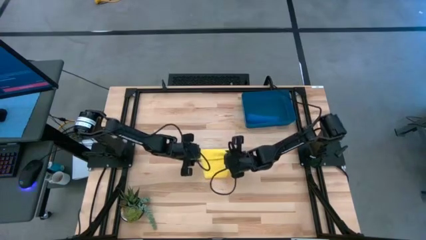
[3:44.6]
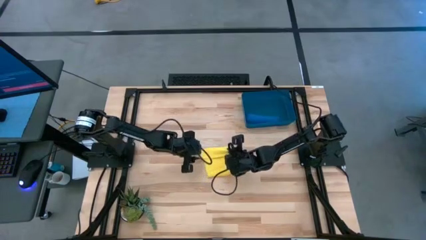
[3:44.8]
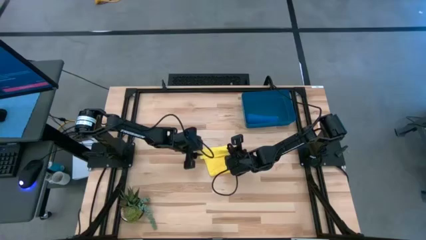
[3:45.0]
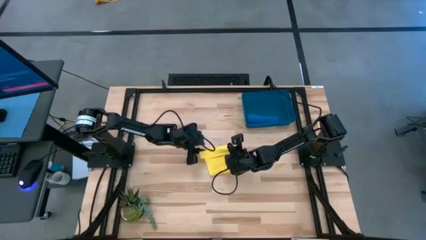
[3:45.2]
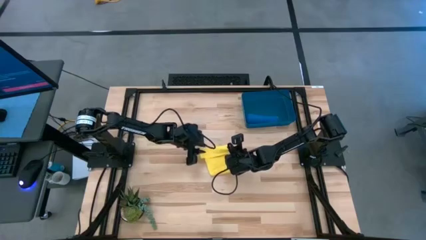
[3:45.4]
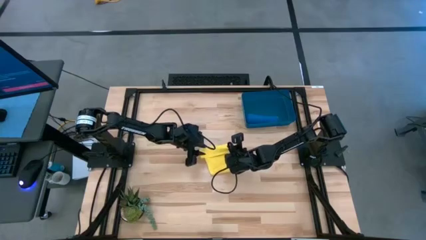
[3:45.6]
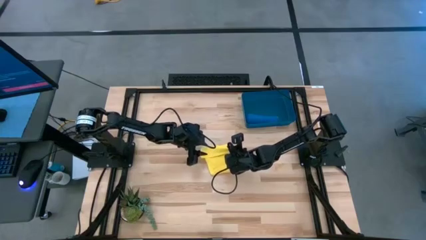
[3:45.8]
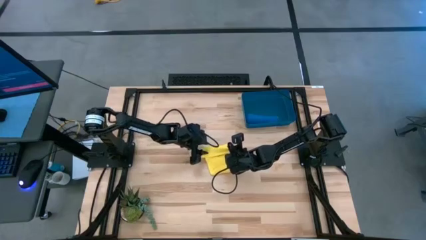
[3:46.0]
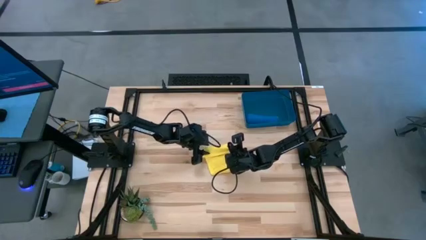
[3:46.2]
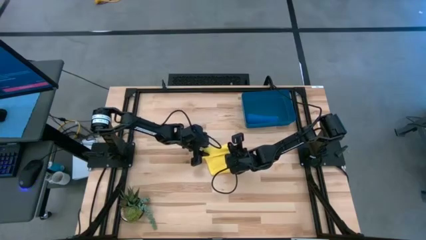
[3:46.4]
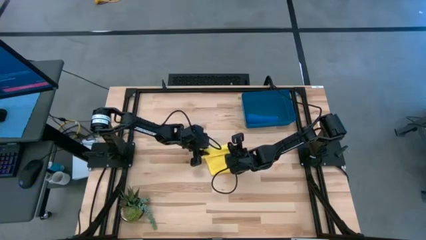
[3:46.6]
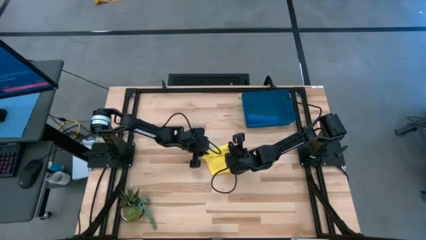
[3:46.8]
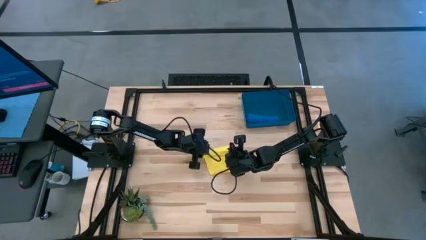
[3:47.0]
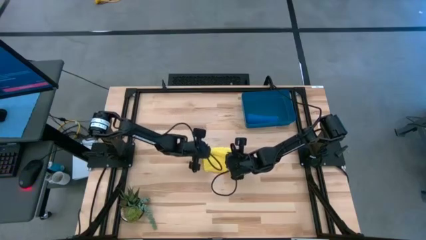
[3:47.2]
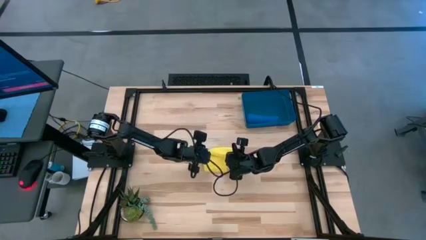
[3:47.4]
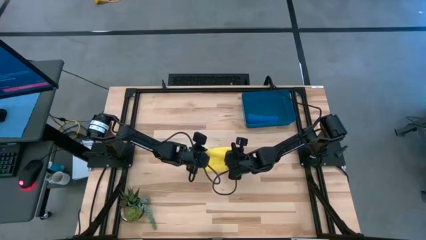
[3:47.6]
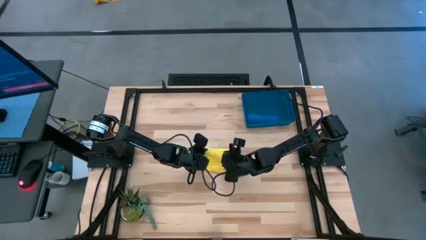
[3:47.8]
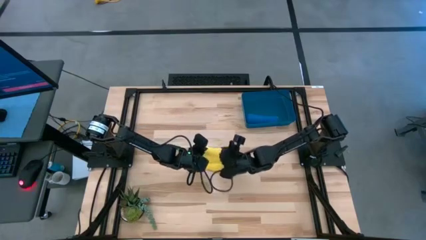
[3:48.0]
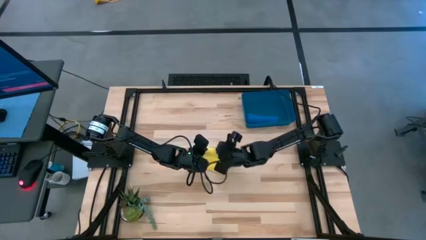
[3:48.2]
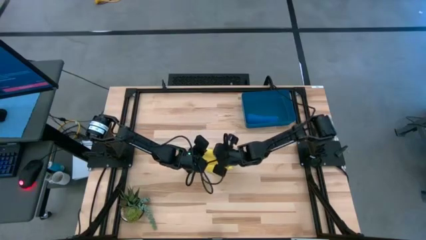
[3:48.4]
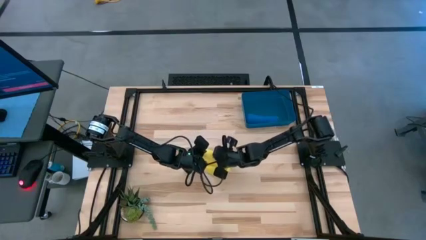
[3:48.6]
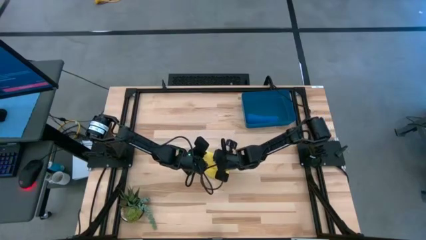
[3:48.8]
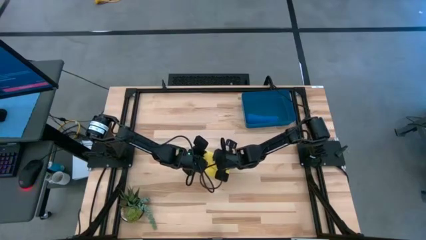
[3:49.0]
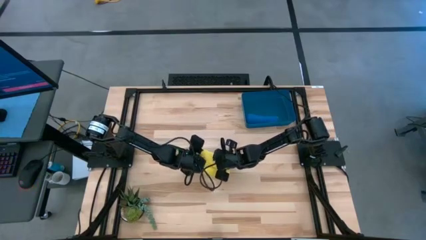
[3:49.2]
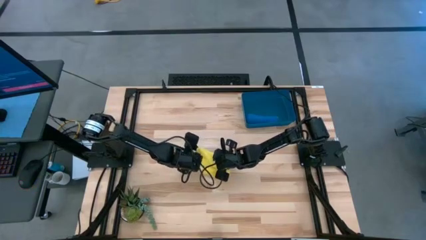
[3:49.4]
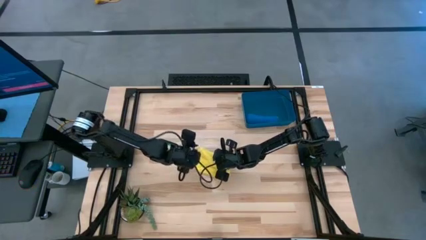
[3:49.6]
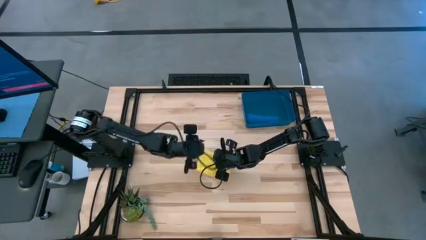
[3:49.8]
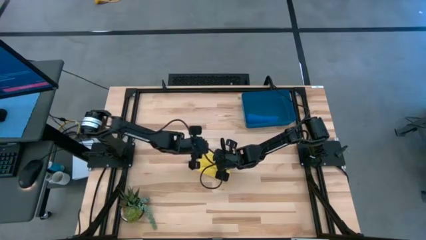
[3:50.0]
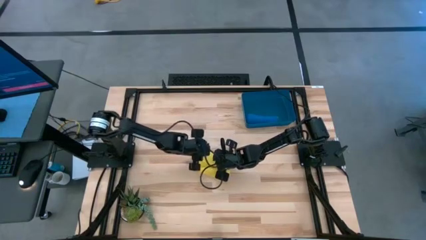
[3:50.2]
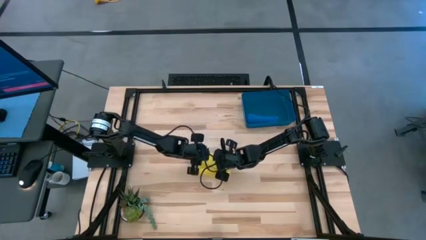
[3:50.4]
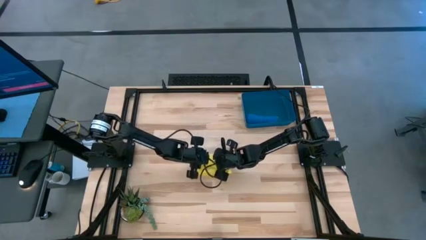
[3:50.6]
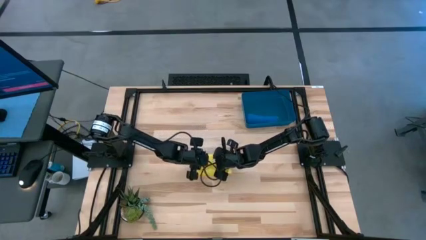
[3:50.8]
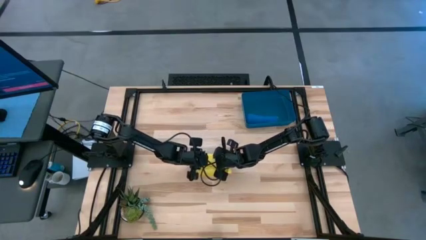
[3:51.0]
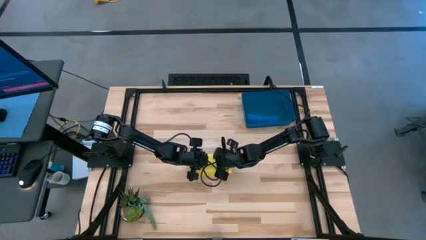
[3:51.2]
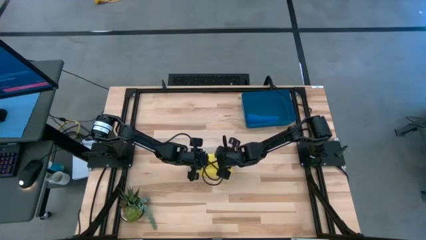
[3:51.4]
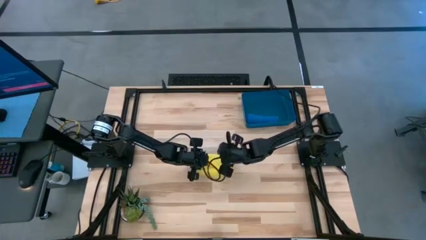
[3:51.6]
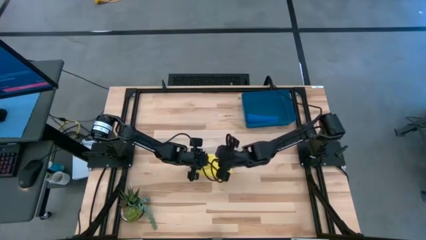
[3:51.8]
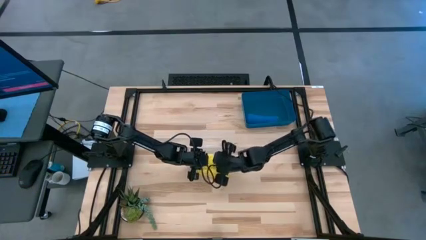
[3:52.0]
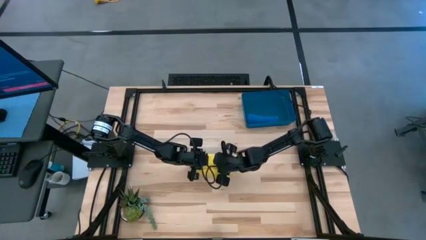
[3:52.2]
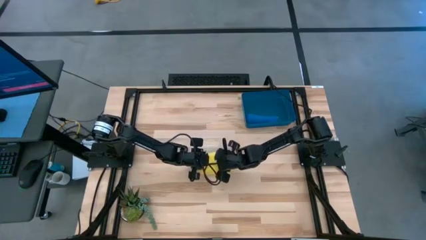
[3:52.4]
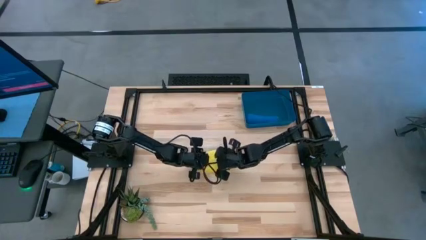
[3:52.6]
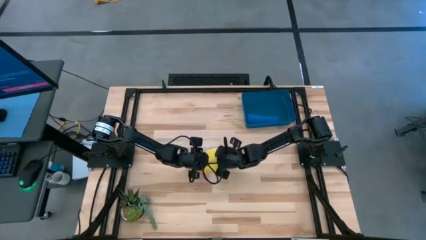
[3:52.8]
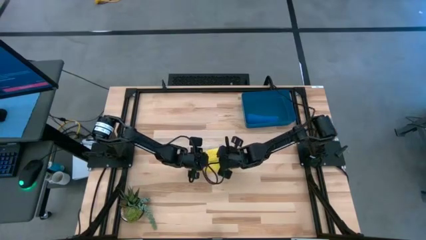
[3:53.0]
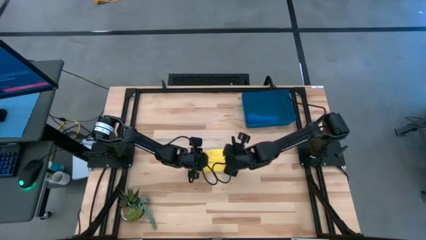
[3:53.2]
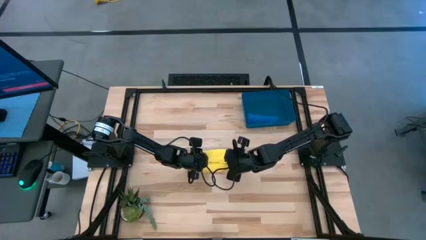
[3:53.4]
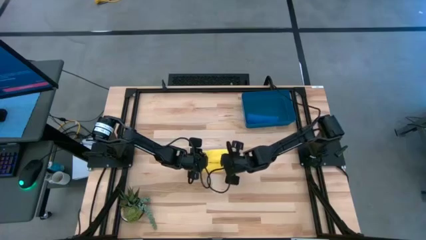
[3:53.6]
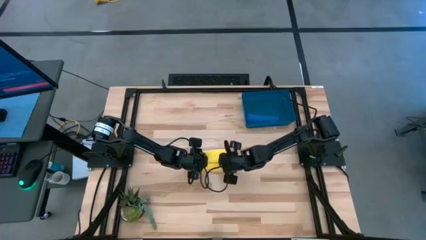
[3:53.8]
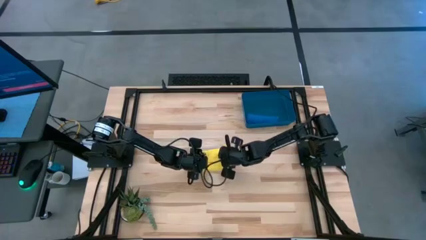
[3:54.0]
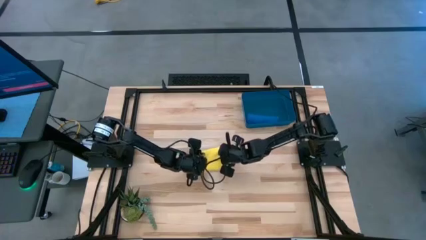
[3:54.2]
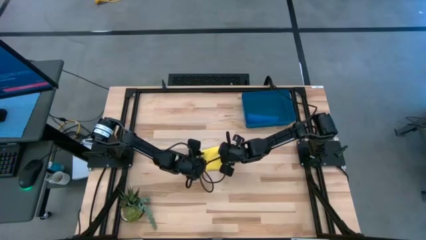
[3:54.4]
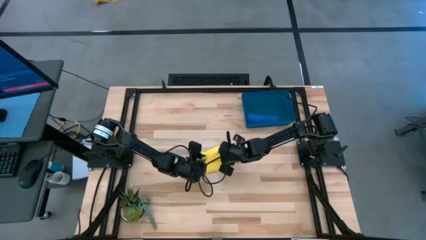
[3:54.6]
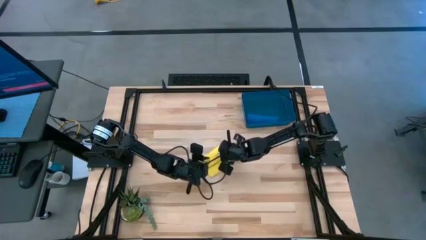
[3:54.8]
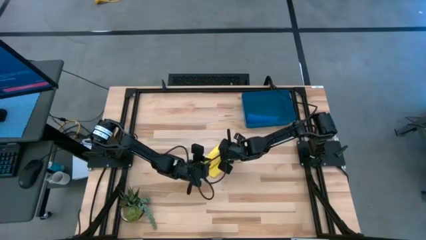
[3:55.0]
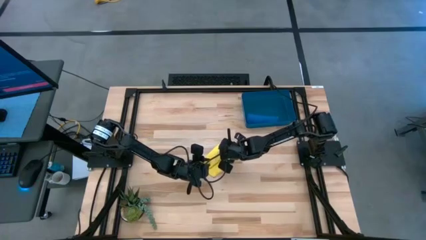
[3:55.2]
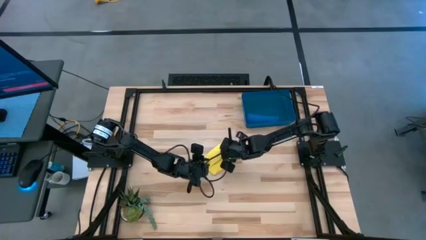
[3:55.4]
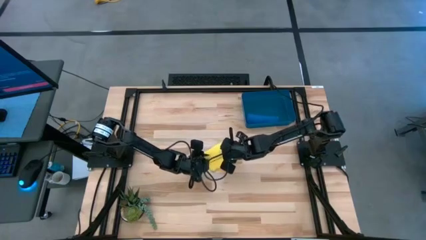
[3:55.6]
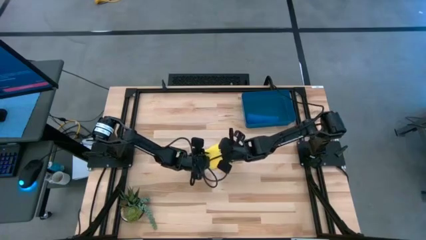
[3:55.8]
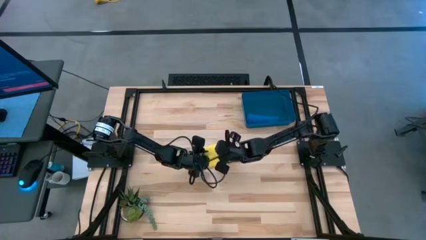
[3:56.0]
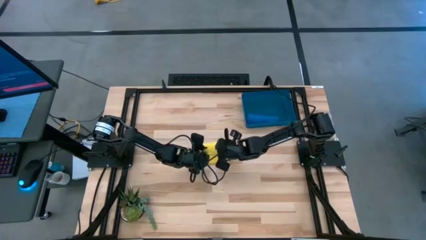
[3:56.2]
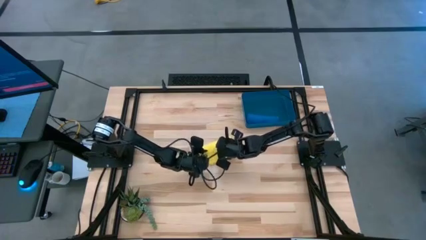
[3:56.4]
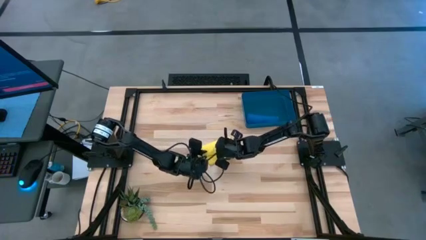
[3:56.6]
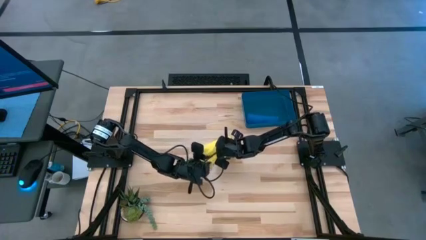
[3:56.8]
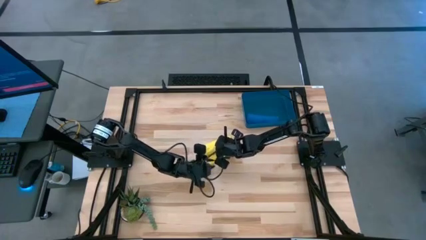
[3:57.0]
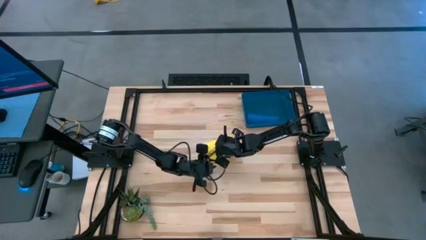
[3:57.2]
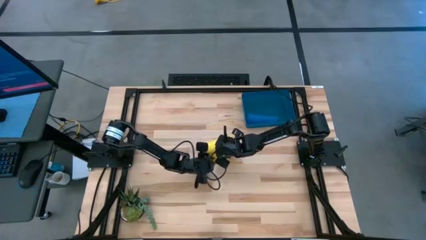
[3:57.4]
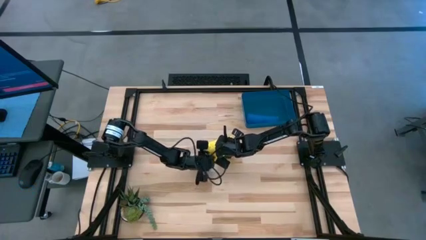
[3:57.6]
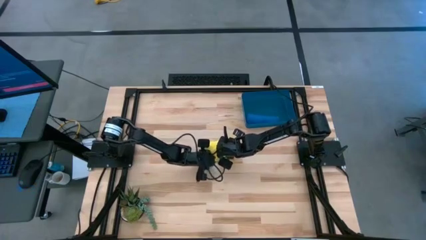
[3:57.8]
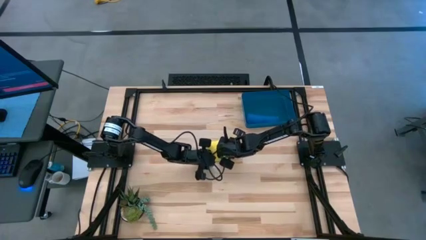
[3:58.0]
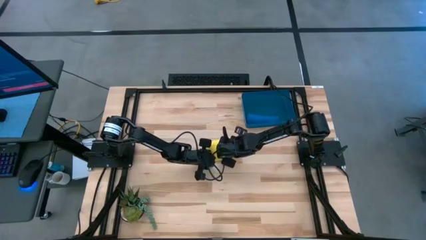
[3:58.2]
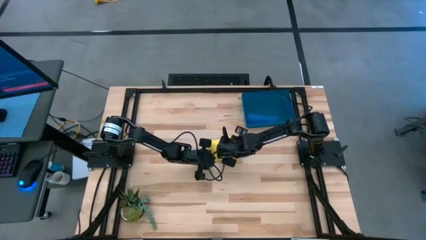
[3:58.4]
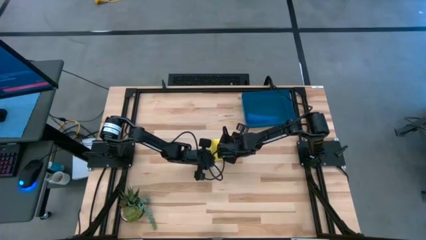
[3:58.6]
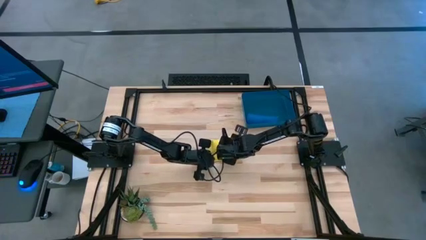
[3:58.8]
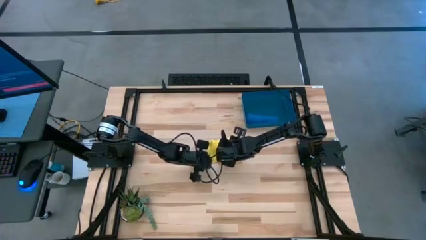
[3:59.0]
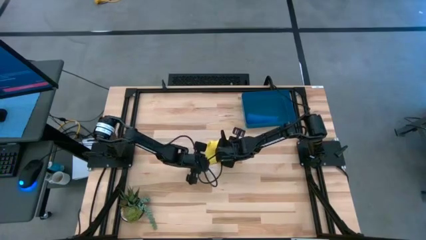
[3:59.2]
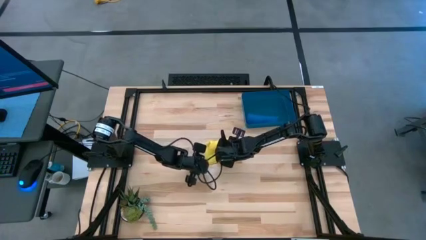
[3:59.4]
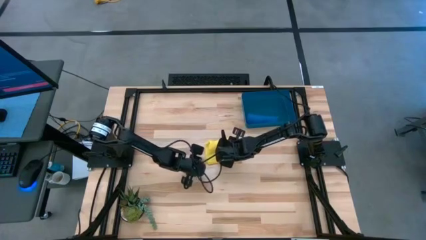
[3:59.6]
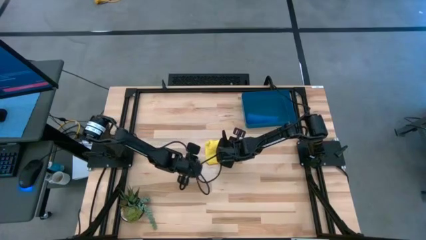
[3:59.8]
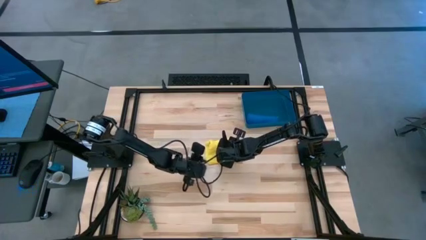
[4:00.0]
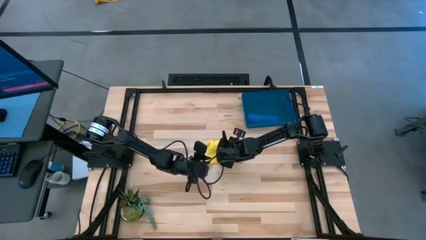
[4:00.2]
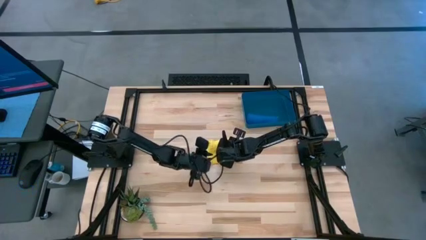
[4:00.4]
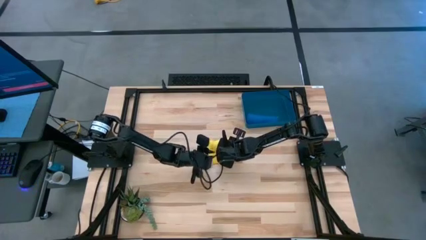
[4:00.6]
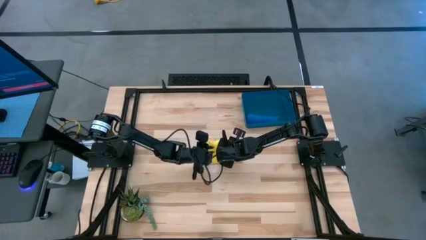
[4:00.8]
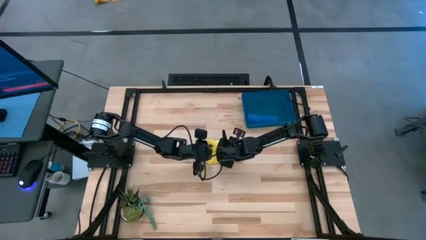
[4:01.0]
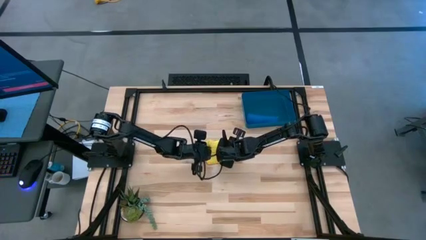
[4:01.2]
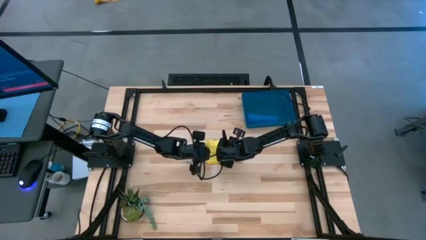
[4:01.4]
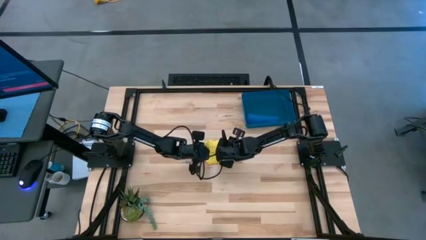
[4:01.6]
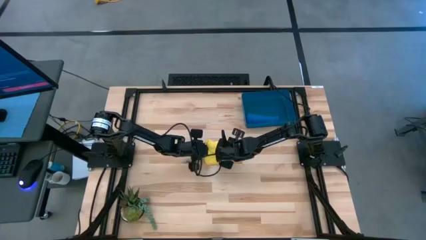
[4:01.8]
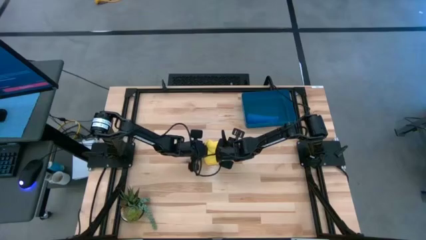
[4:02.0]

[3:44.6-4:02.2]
Task: Roll microfiber towels into tight, uniform cylinder then place into a basket
Roll the yellow microfiber cloth
